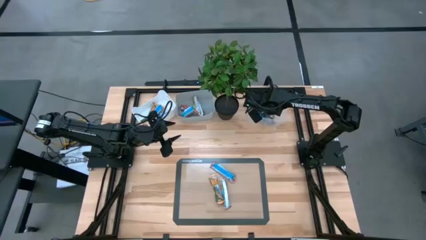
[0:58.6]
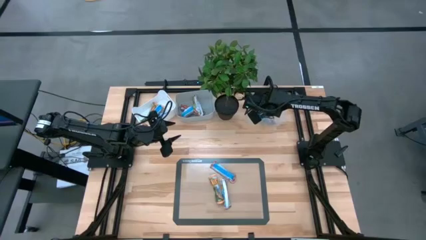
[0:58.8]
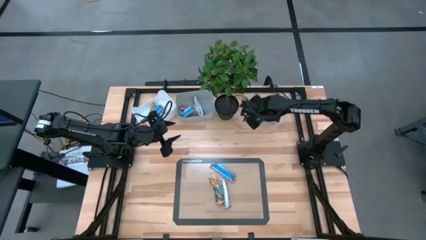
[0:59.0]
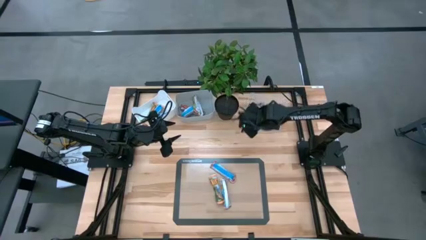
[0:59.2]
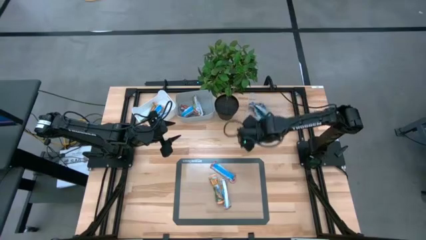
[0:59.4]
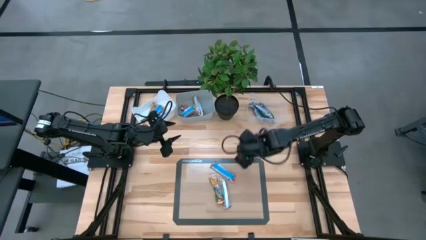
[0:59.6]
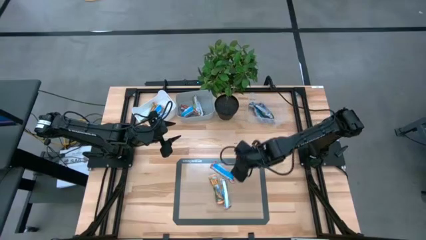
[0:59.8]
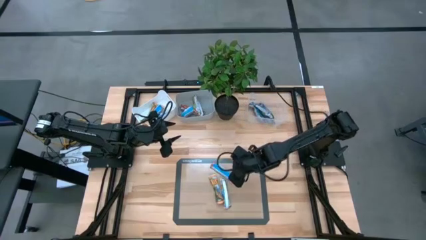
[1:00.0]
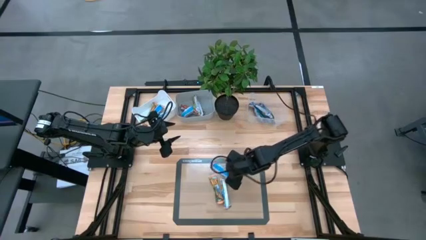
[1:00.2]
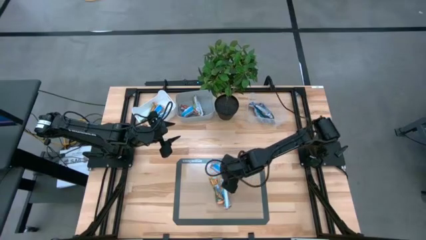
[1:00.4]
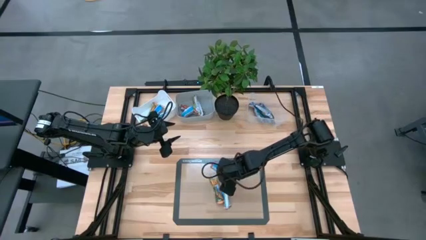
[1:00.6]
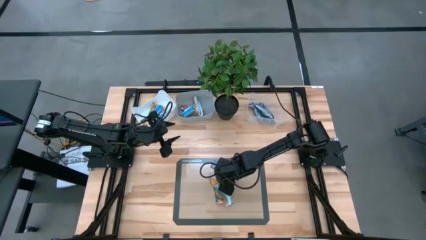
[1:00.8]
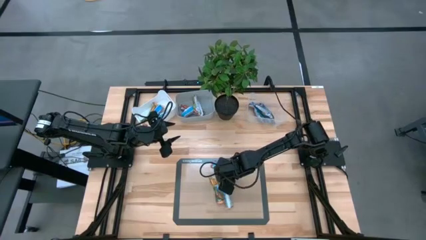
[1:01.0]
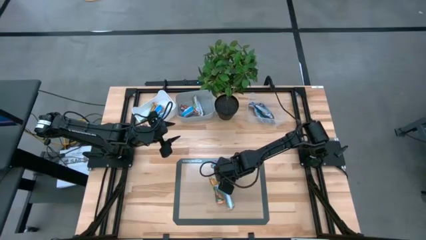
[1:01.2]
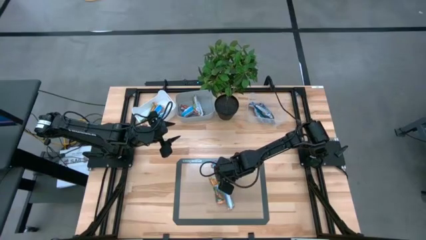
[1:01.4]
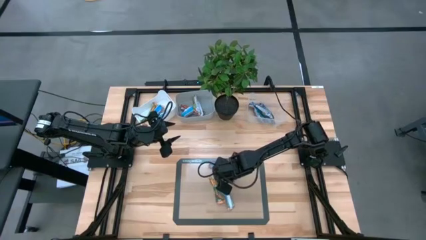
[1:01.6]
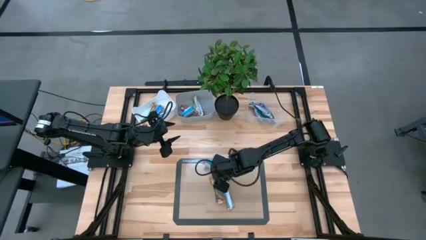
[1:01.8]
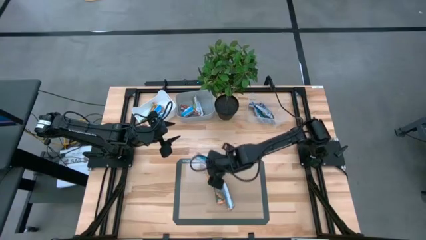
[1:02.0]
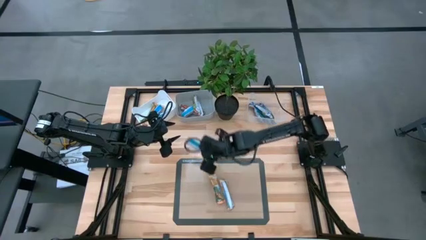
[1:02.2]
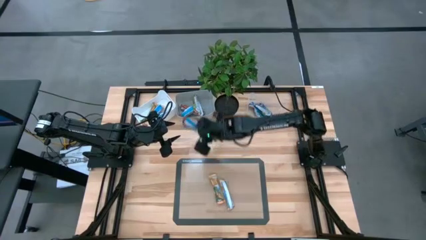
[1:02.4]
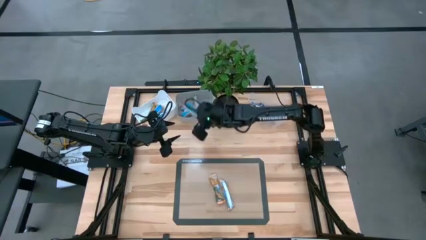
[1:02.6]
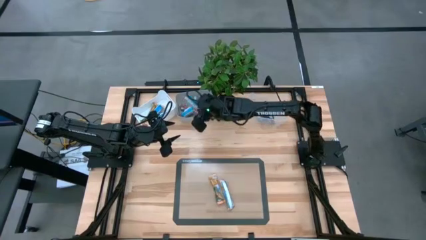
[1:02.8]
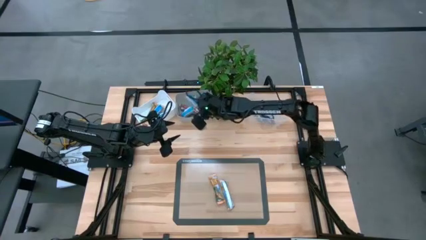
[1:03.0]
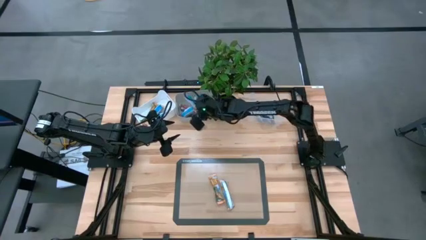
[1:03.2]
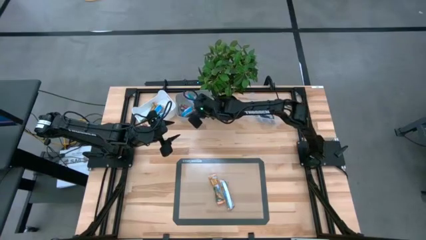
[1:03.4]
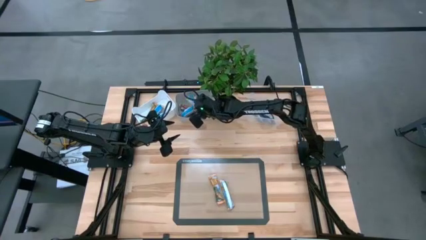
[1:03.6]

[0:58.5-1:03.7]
Task: Pick and place Granola Bars by type
Put the red granola bar into the gray bin

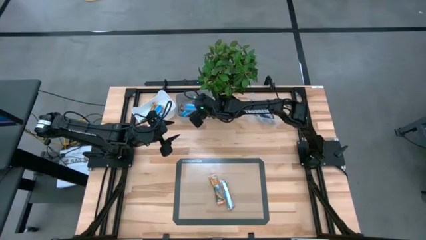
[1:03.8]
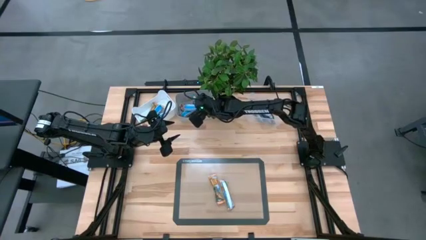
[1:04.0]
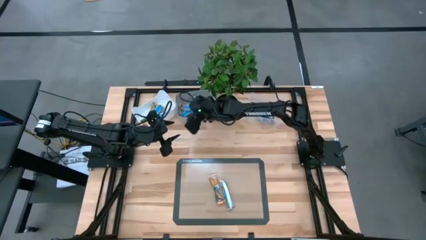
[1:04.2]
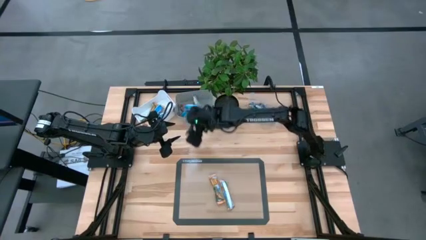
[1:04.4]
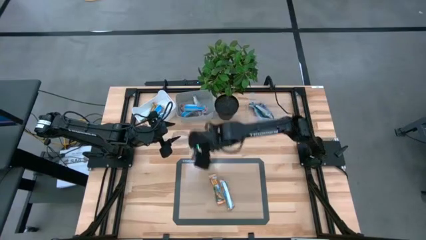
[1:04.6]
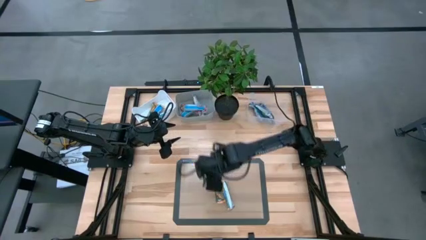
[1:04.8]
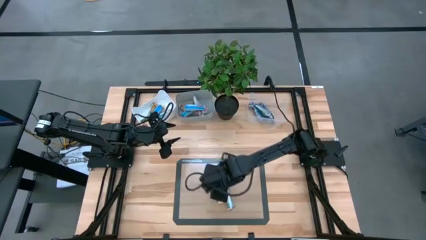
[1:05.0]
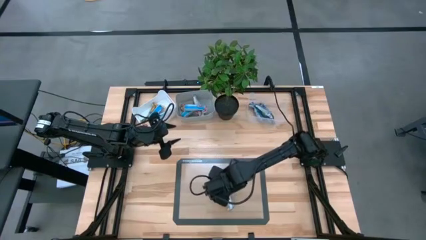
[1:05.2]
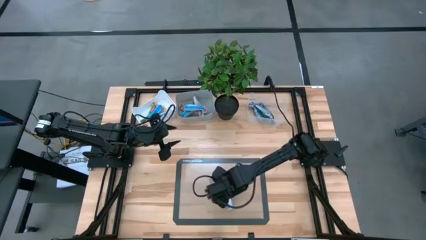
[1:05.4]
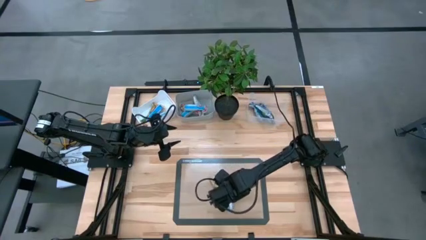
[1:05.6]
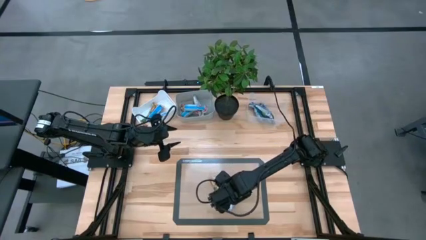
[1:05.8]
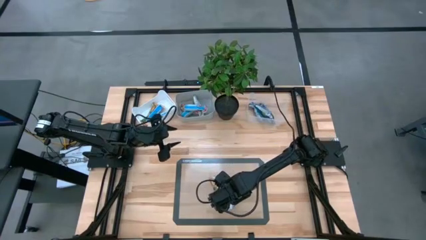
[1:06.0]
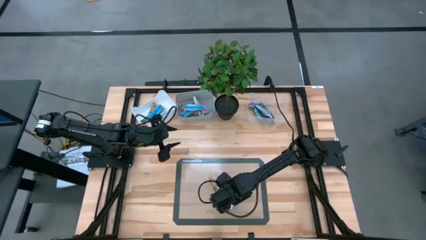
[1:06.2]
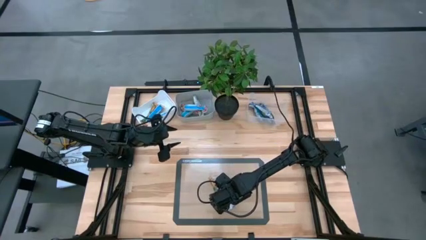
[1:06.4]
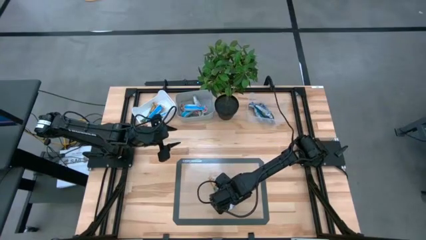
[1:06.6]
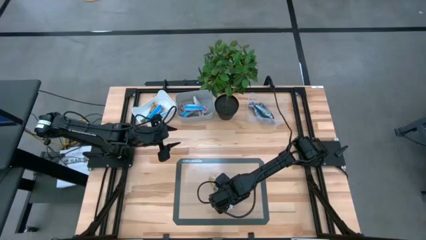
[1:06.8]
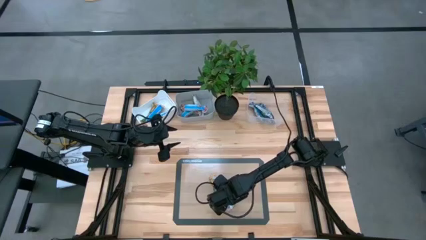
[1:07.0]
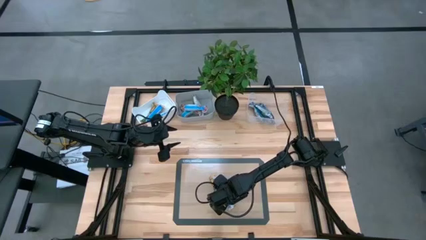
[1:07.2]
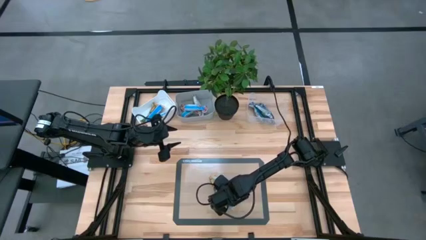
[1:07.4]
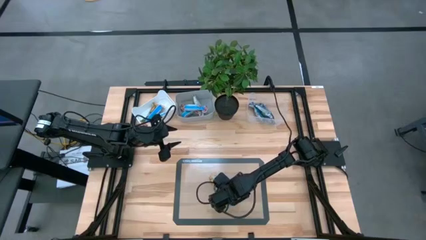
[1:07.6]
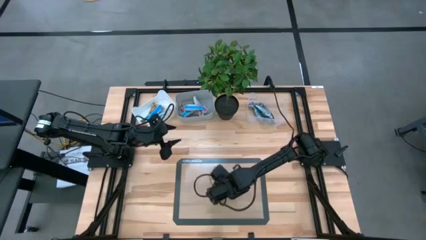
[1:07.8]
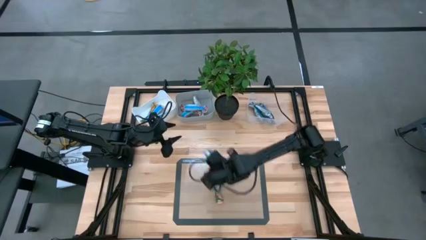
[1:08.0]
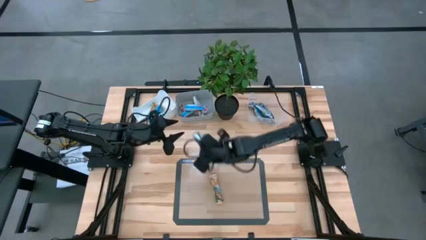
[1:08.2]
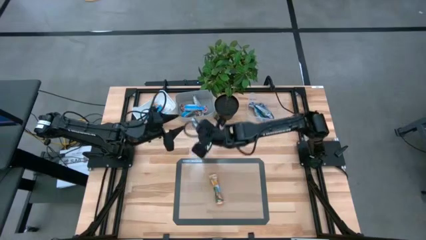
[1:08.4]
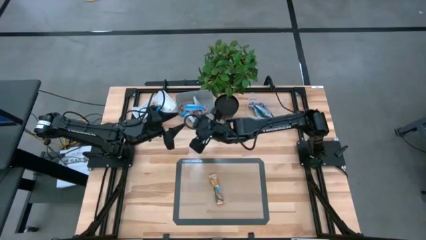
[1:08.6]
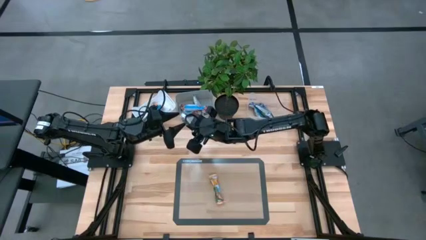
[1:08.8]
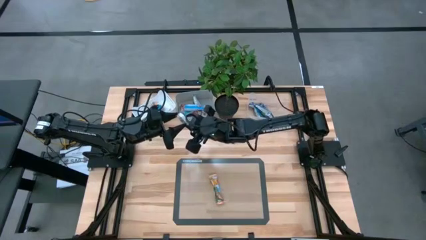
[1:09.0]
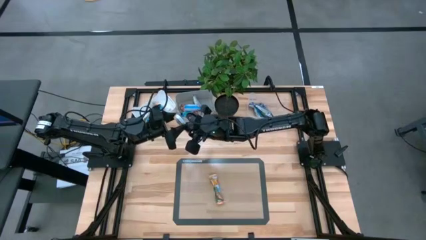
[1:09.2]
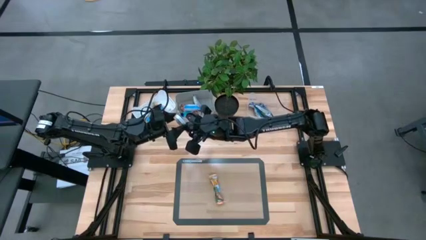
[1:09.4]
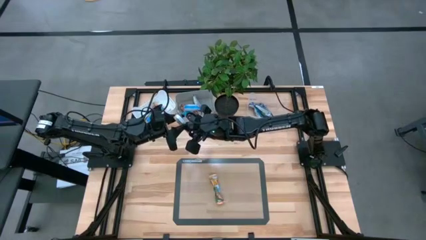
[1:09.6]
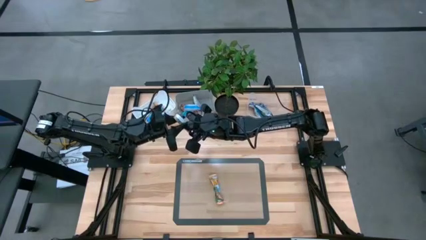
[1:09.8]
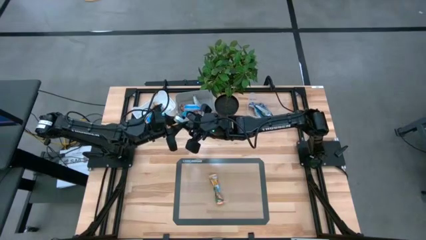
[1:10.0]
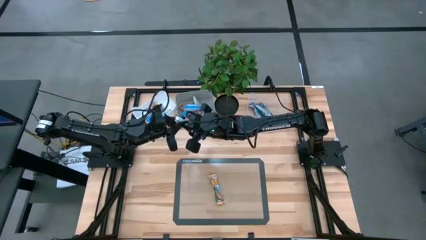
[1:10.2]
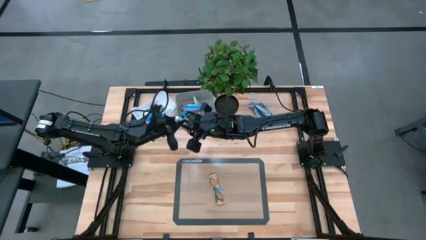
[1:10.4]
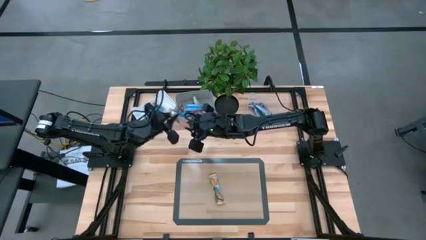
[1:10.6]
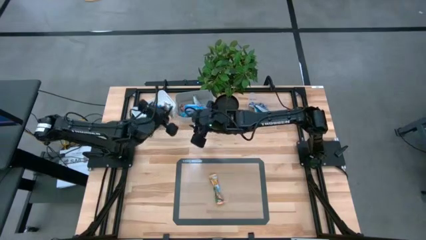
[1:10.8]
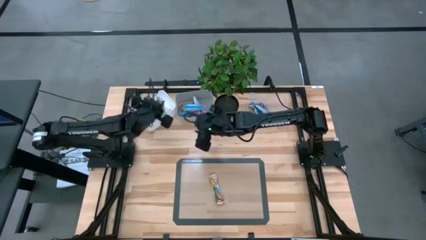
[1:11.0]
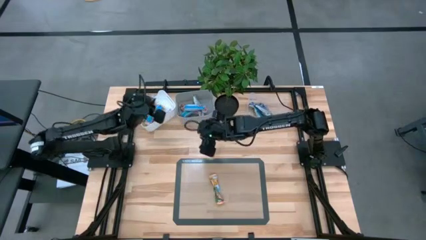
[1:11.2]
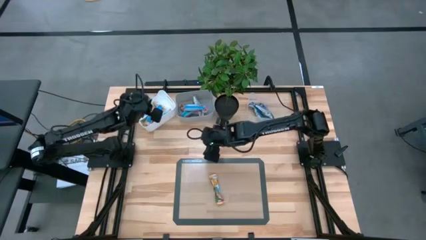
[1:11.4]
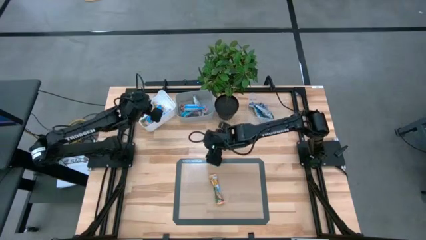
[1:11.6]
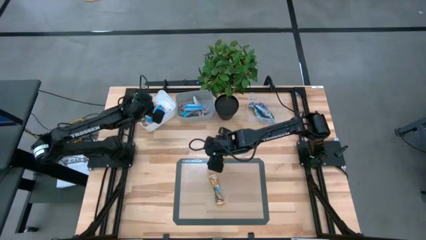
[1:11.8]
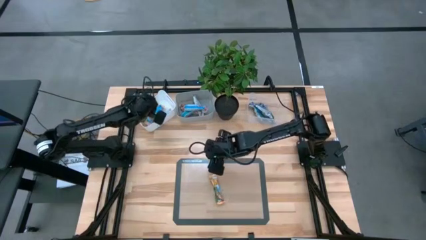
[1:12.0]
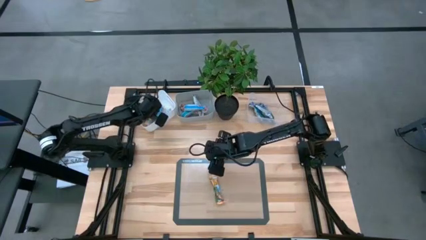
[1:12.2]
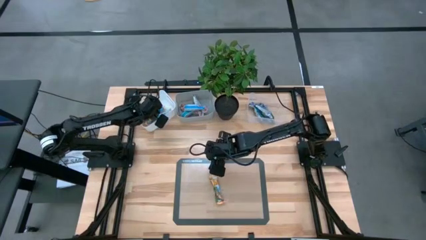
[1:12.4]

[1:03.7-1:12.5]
Put the yellow granola bar into the white bin

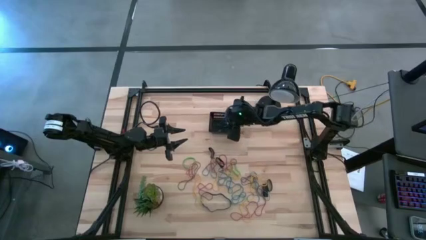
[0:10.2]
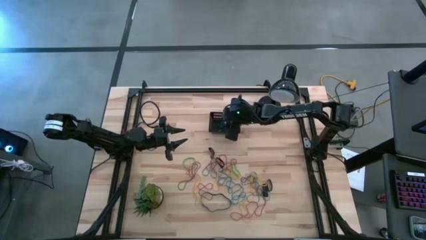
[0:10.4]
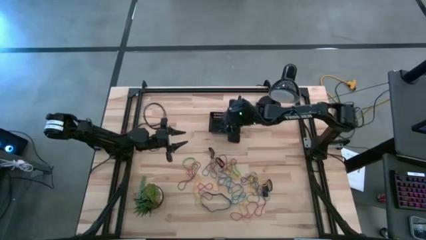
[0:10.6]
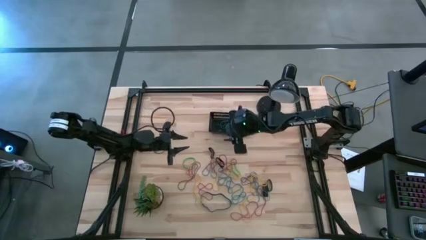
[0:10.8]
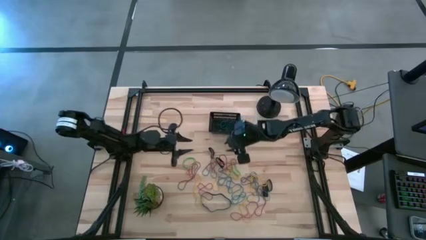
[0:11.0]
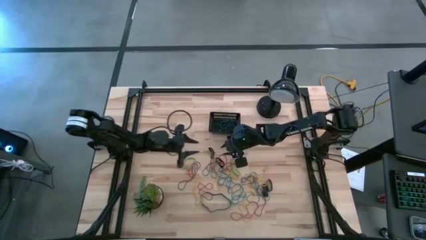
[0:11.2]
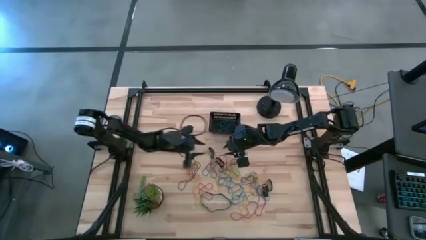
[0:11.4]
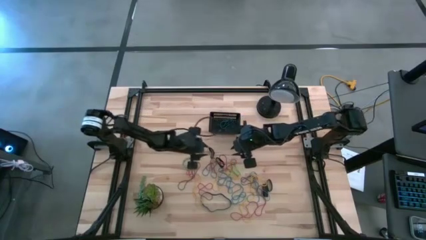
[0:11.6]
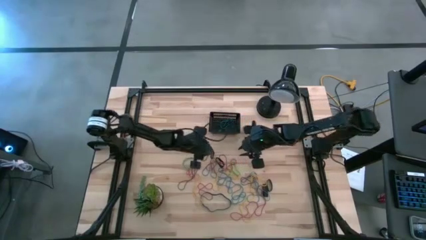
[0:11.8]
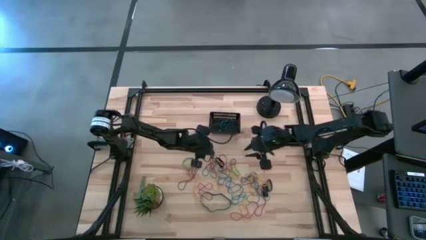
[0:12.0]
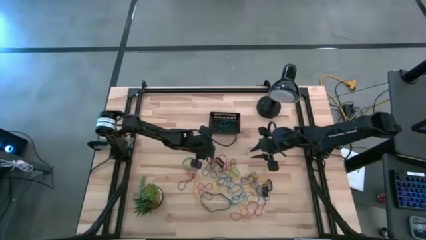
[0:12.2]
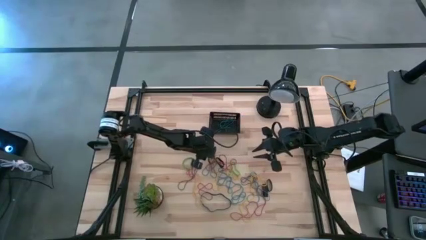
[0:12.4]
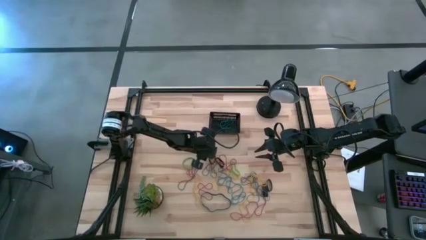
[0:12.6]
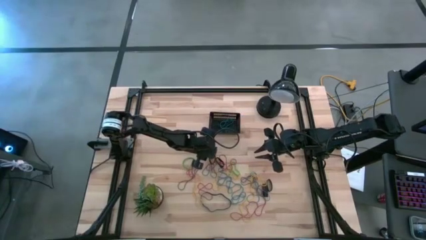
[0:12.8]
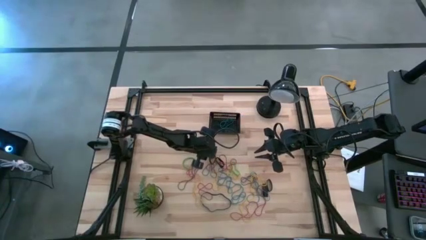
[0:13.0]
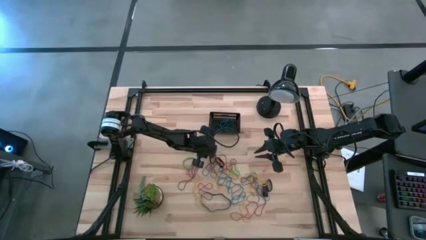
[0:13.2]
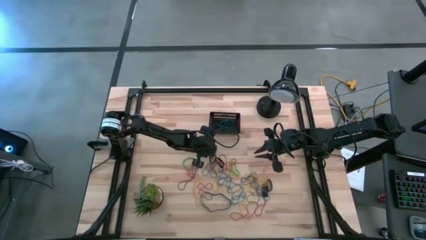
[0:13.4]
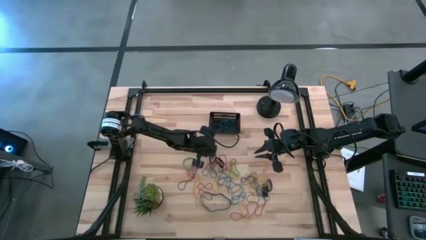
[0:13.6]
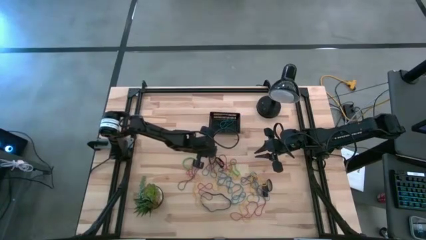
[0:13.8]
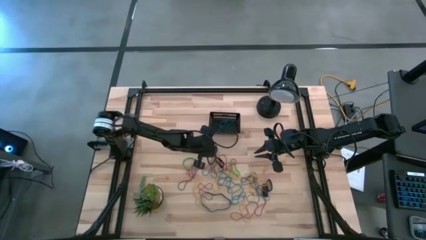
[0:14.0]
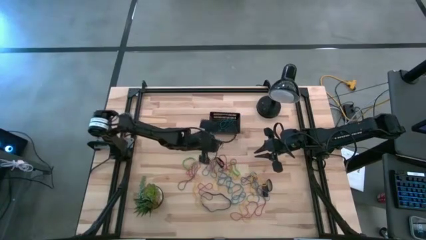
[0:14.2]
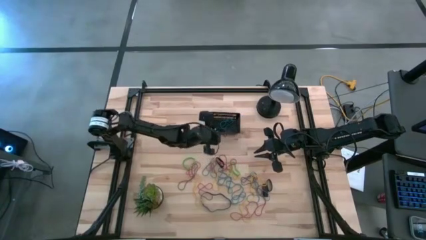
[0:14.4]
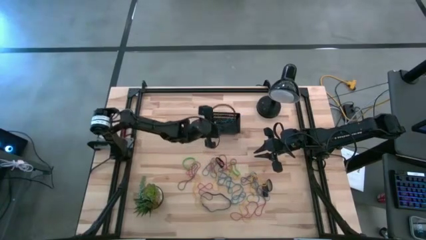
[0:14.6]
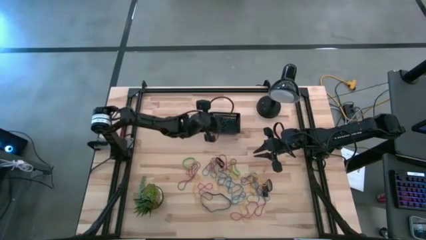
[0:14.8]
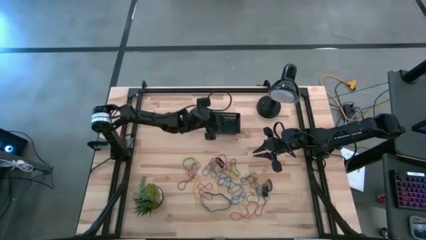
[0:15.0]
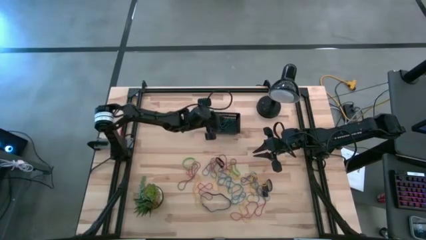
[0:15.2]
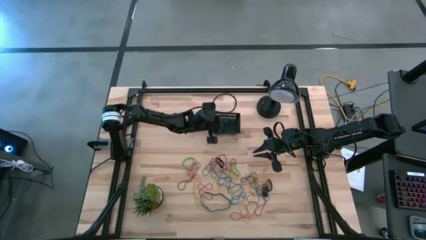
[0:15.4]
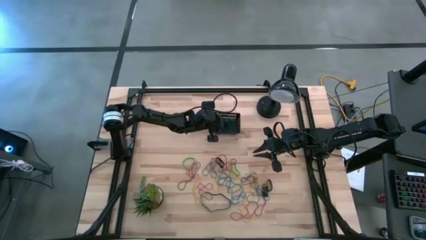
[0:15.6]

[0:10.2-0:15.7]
Task: Pick and place rubber bands into bin
Put the black rubber band into the basket
